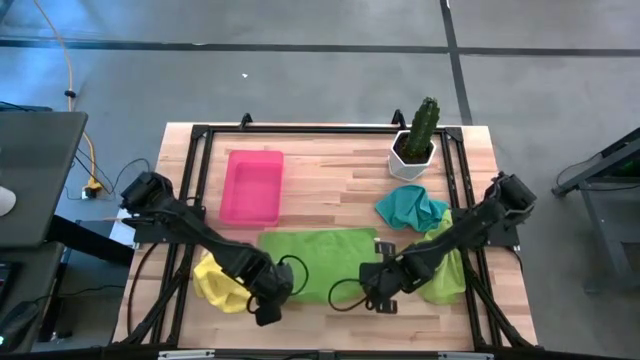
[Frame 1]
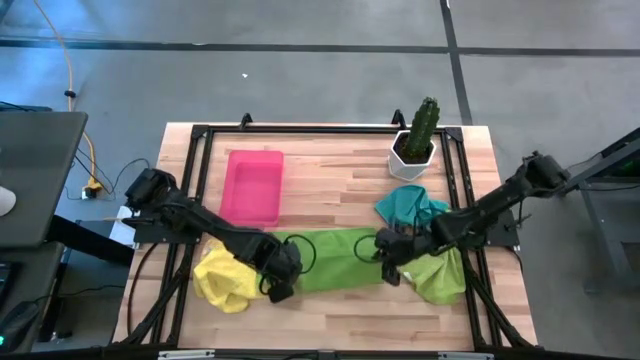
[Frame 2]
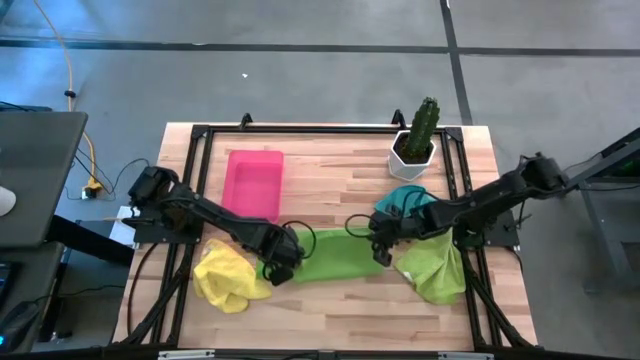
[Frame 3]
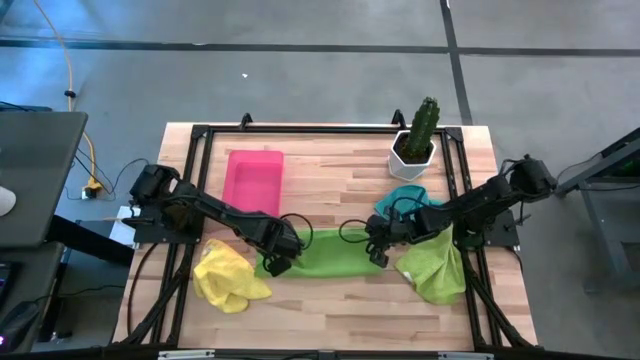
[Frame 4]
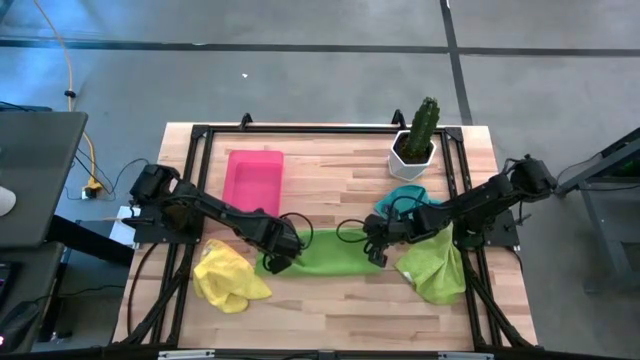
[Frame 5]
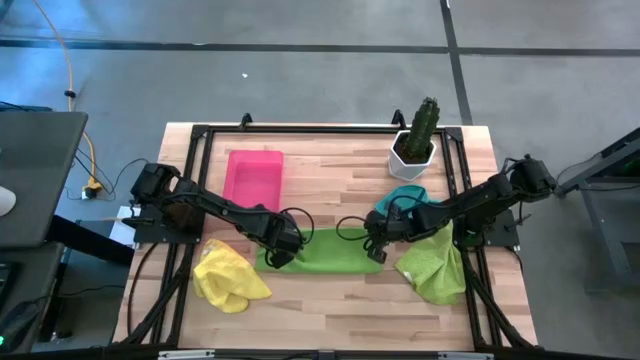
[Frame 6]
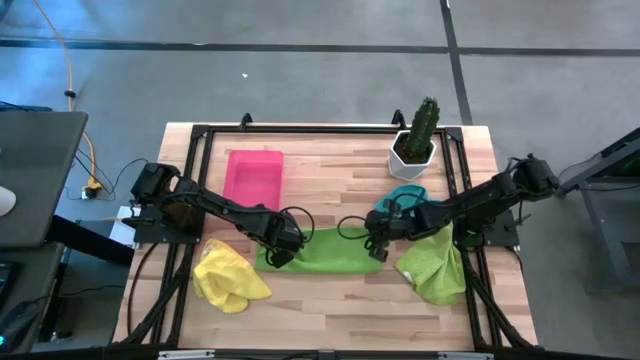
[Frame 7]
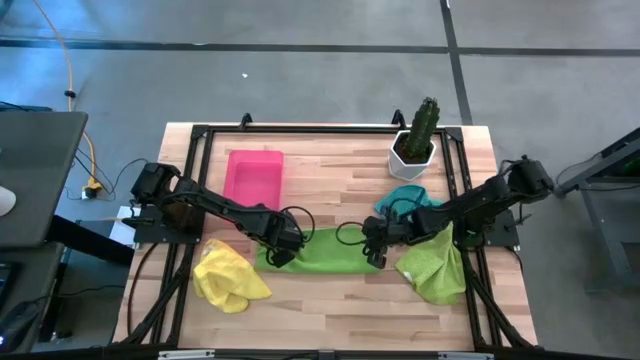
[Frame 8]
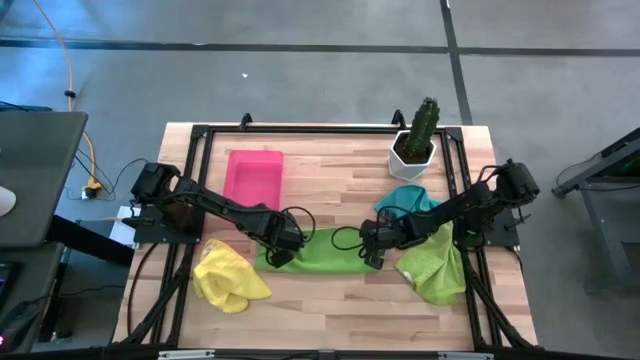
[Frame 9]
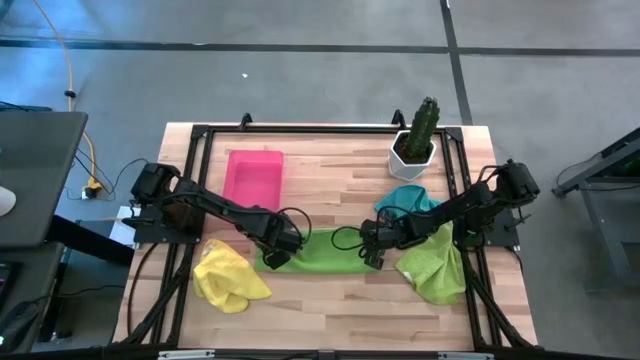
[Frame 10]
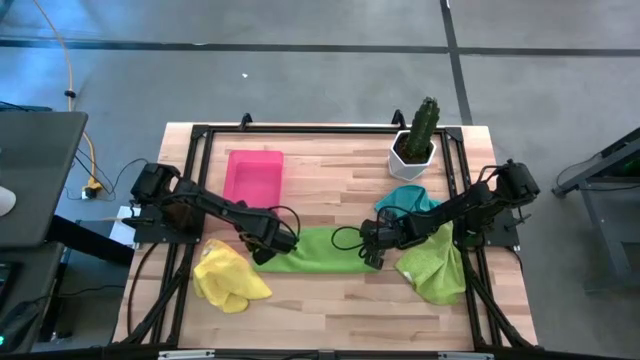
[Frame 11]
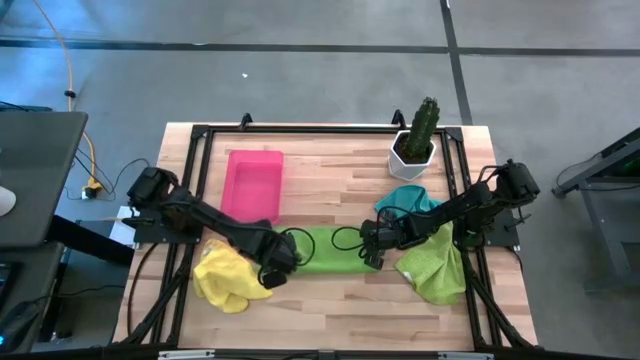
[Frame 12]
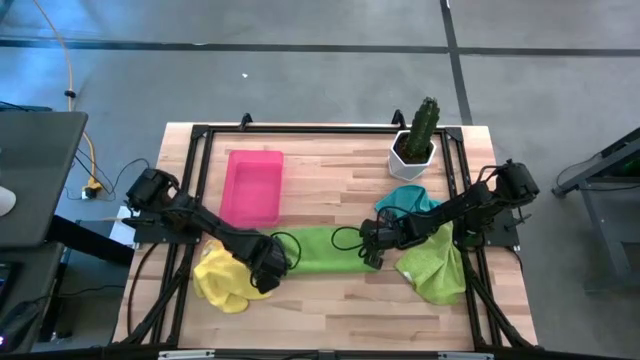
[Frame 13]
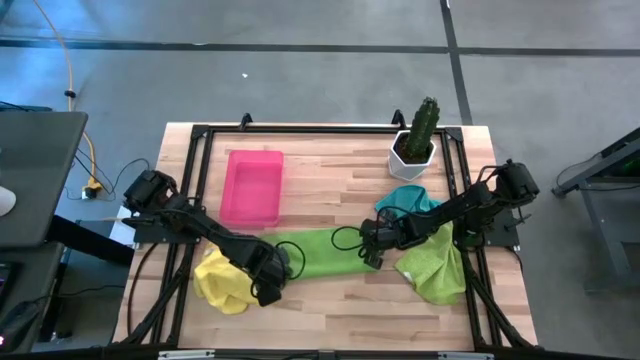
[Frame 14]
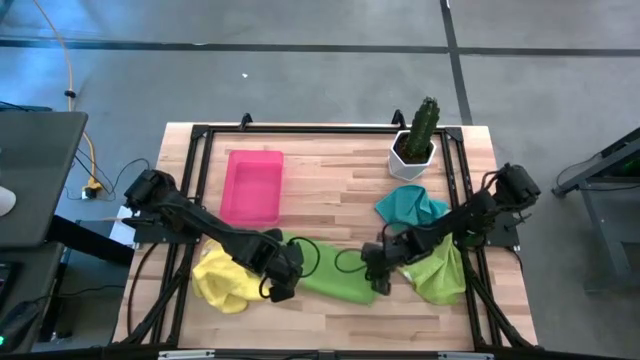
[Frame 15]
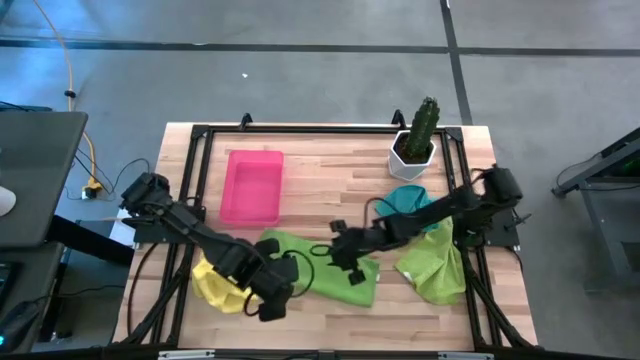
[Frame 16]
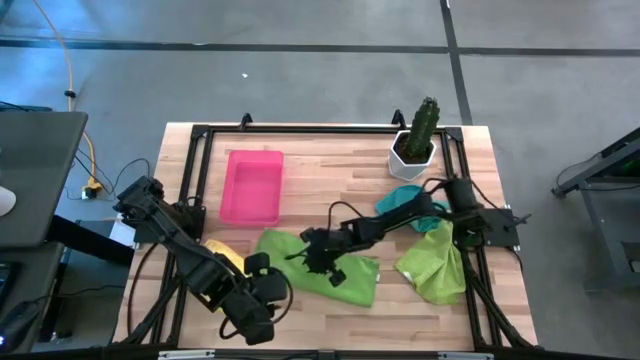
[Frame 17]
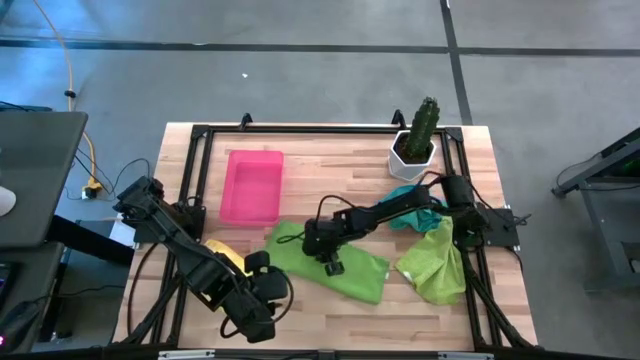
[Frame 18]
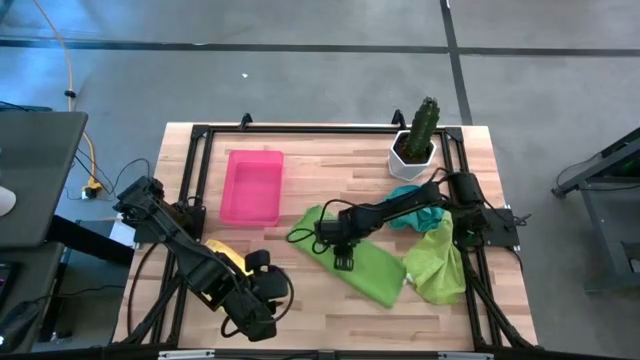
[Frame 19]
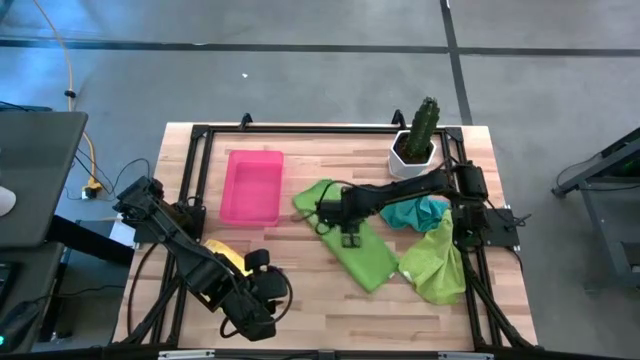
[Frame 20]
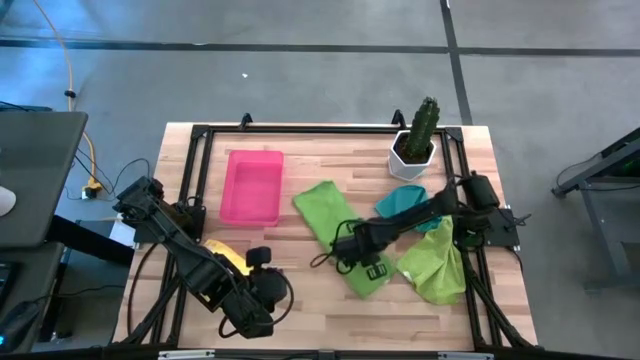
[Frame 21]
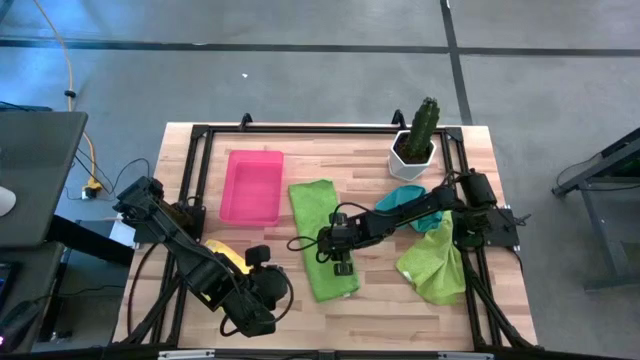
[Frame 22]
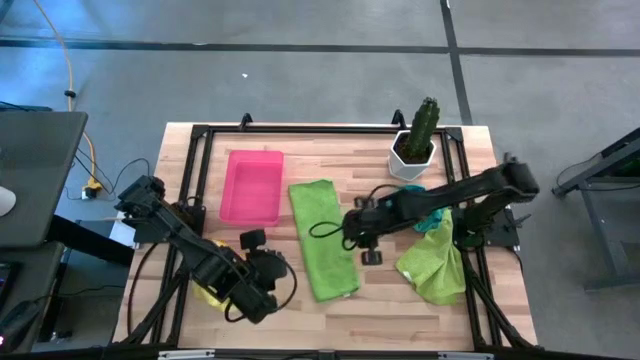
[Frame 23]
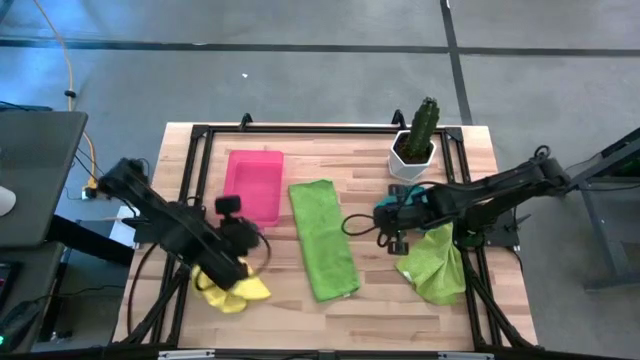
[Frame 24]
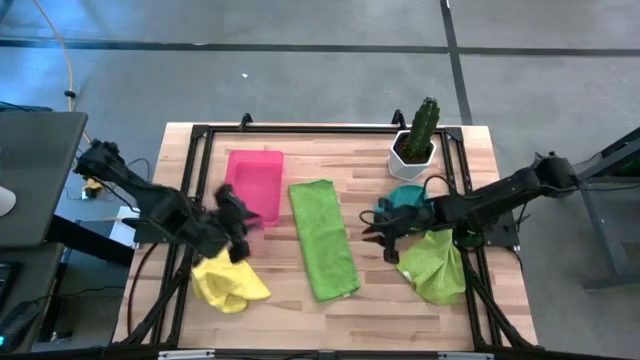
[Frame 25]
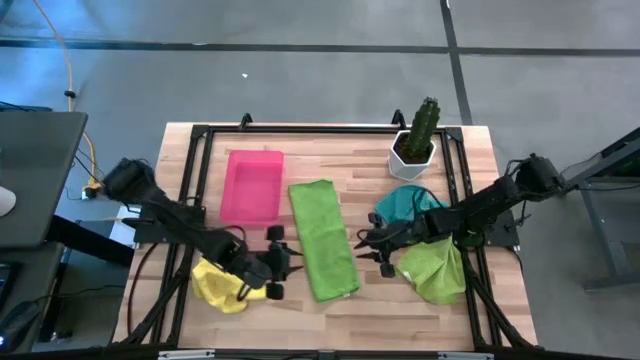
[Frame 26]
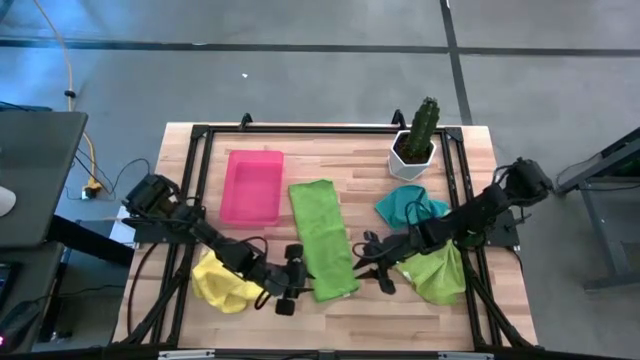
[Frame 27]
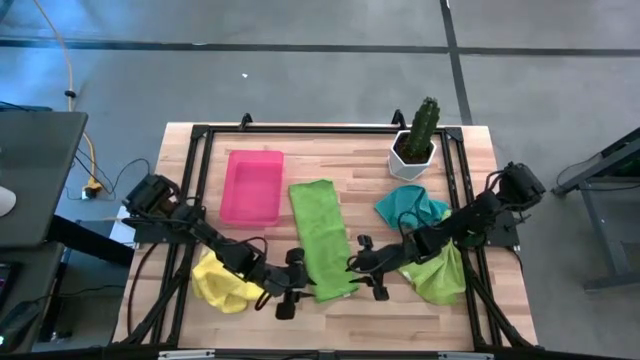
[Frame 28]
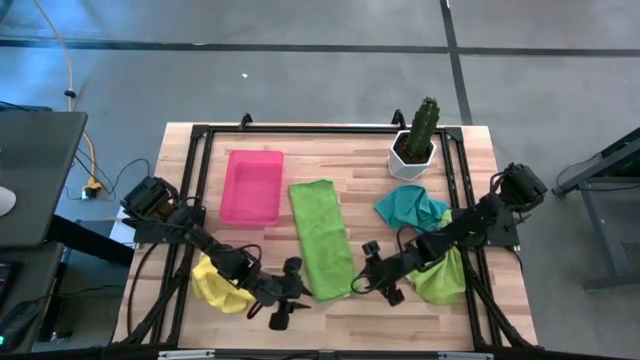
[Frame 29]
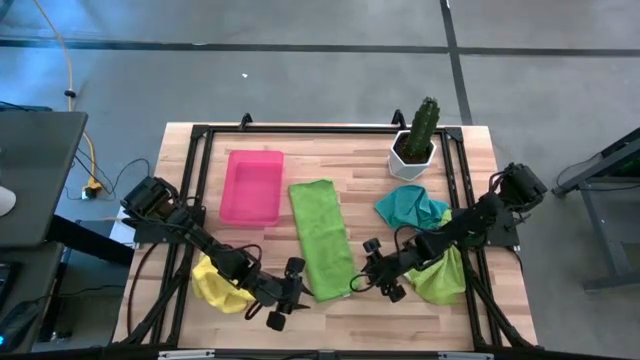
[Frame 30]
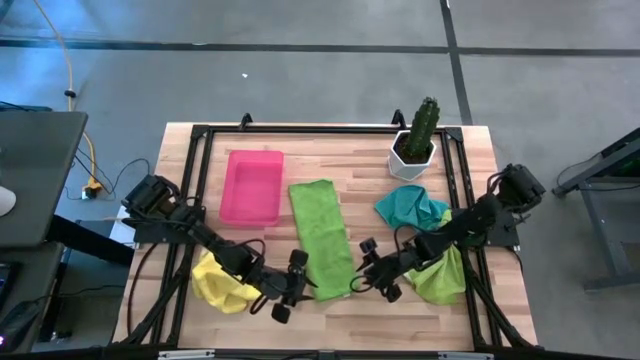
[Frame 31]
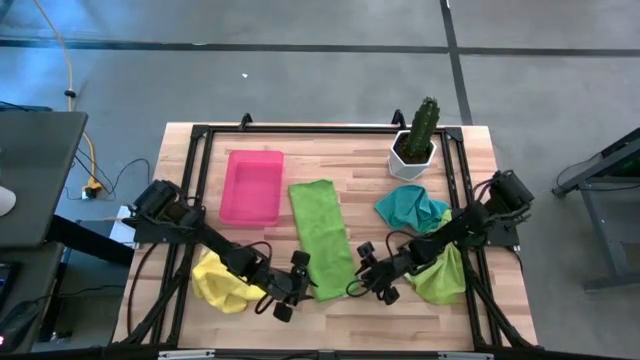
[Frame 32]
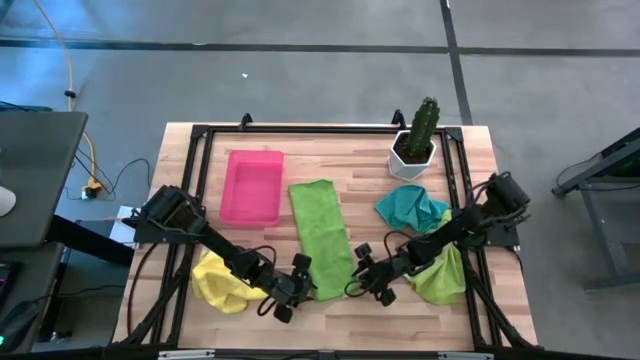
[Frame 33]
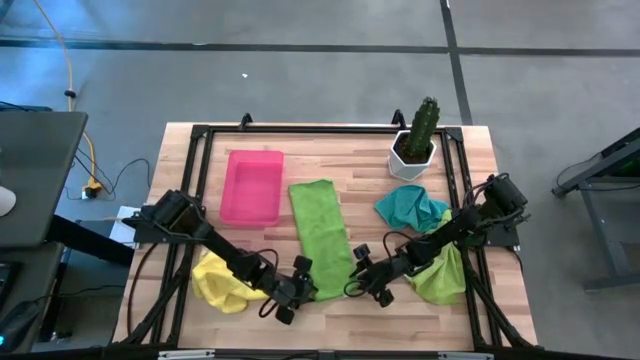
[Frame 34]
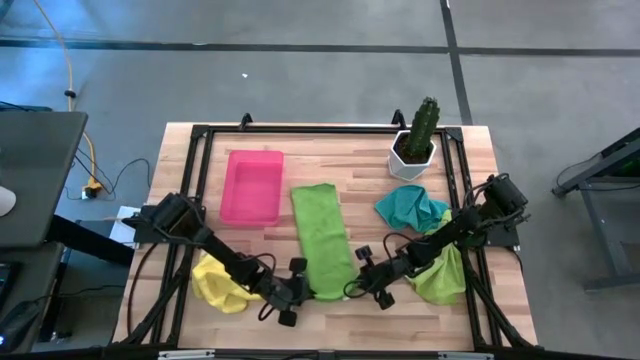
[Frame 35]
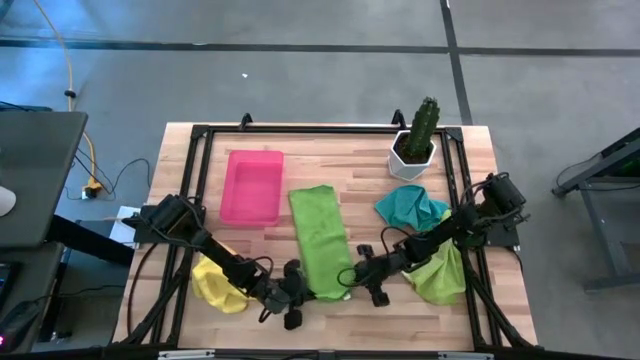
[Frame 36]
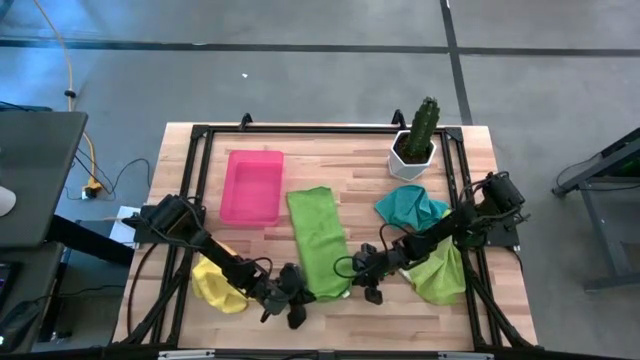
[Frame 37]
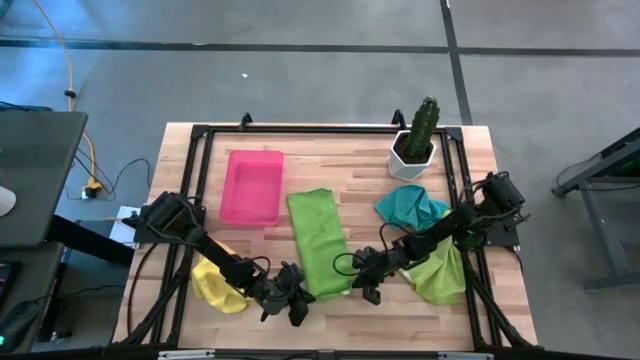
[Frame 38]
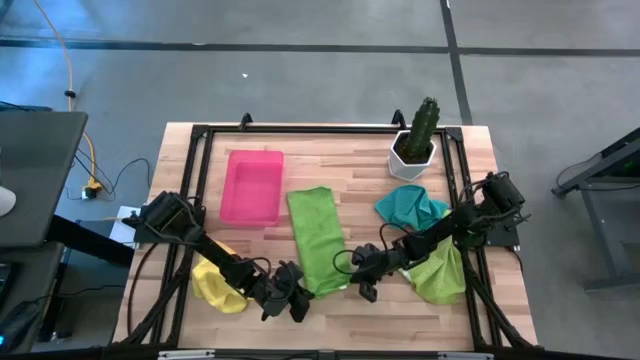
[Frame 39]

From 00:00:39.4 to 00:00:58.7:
Task: Roll microfiber towels into tight, uniform cylinder then place into a basket
Roll the green microfiber cloth
